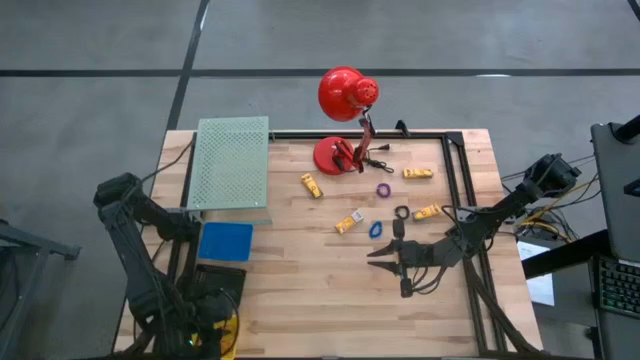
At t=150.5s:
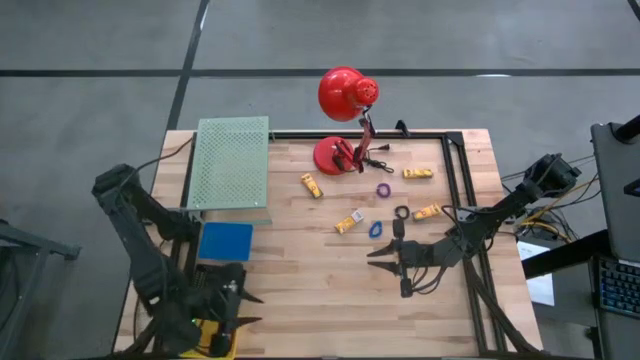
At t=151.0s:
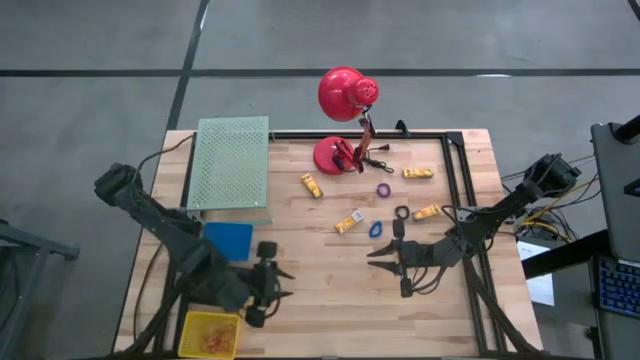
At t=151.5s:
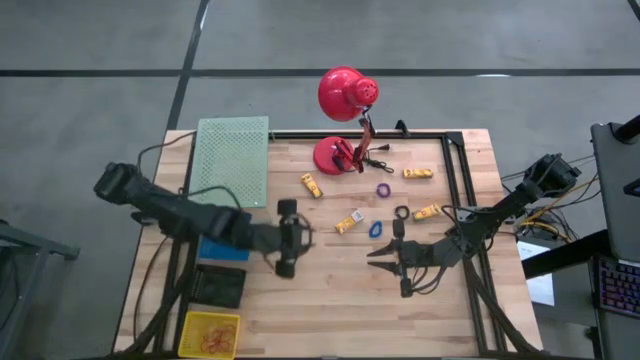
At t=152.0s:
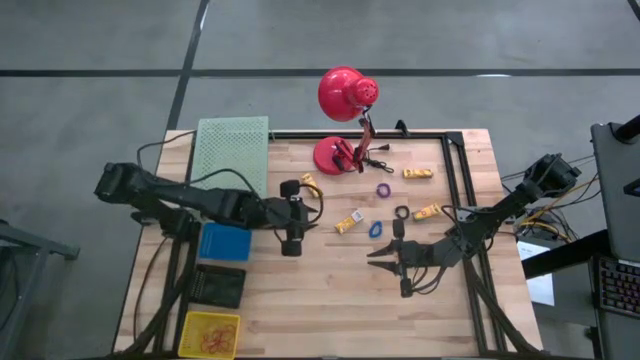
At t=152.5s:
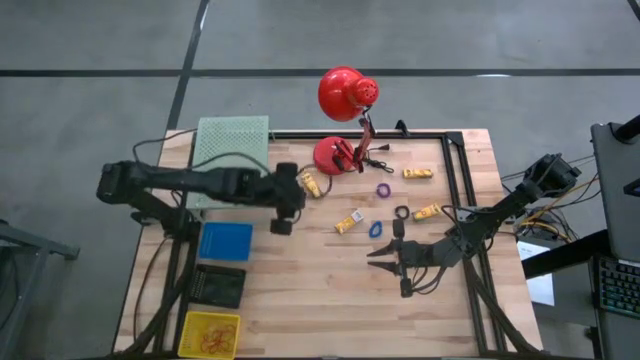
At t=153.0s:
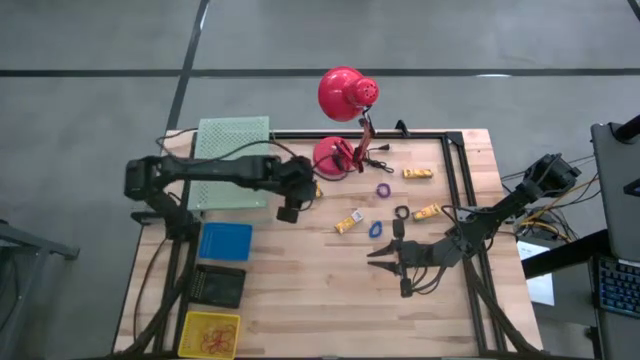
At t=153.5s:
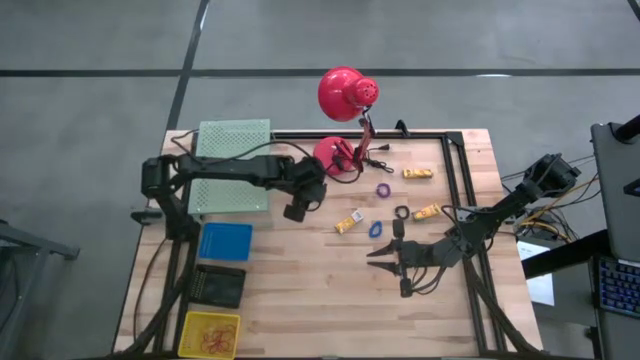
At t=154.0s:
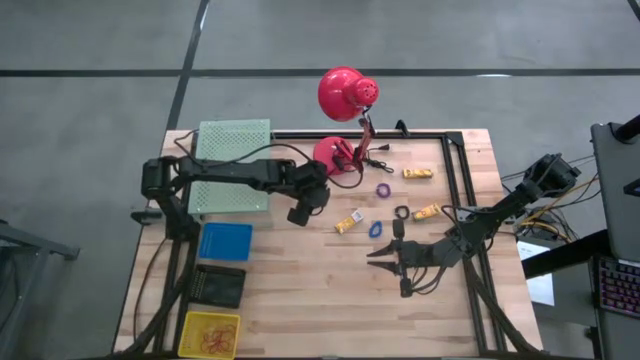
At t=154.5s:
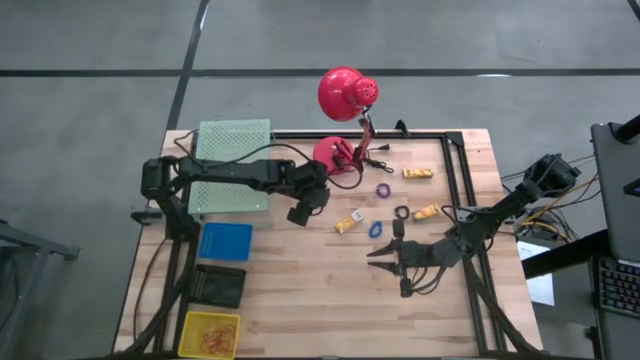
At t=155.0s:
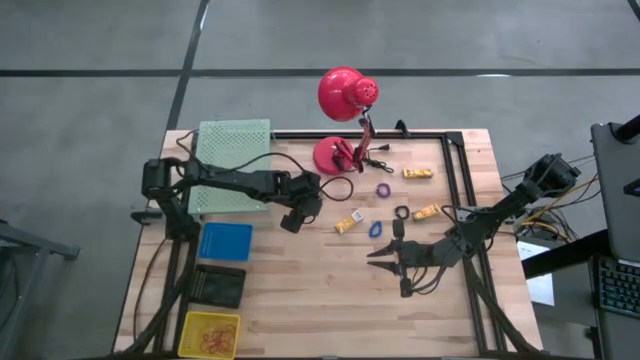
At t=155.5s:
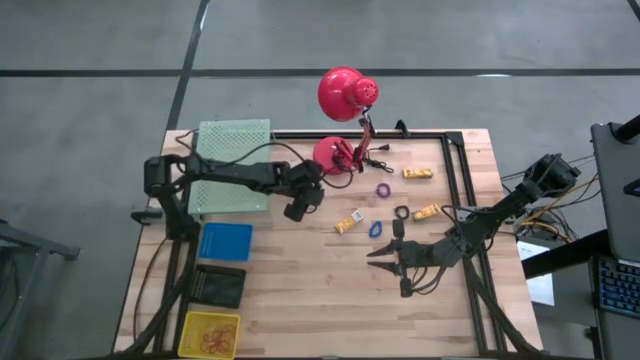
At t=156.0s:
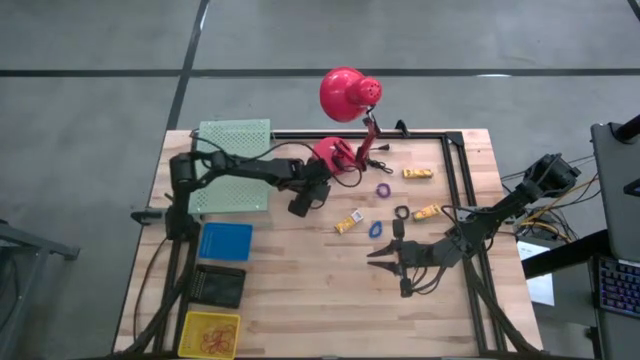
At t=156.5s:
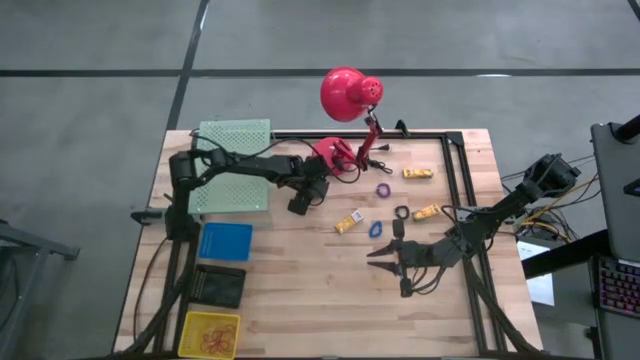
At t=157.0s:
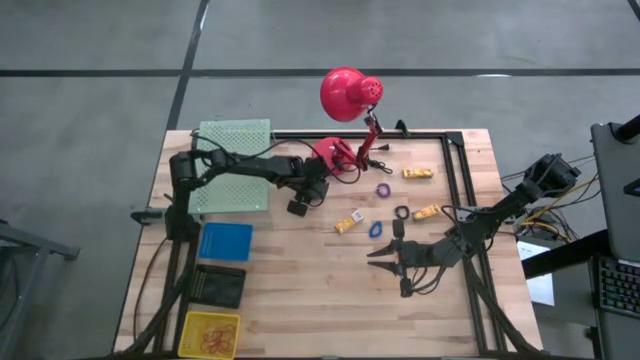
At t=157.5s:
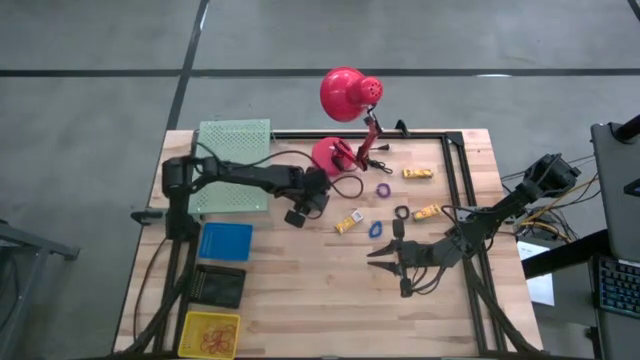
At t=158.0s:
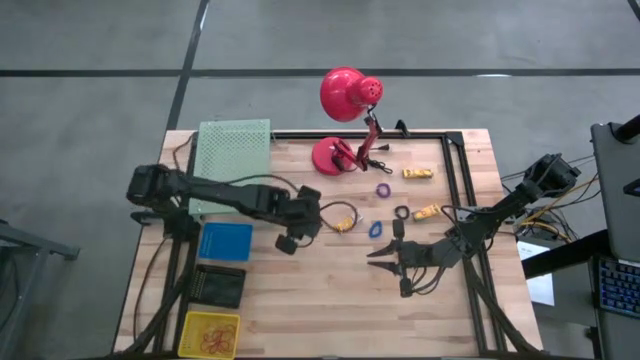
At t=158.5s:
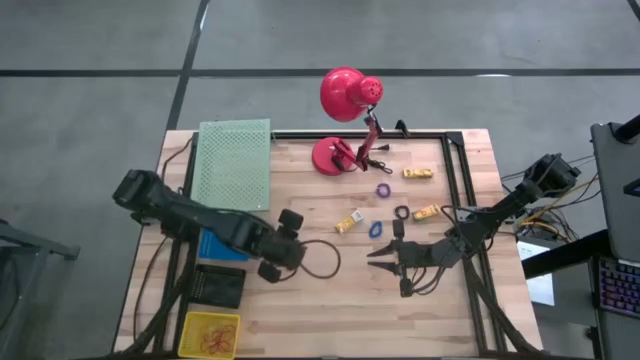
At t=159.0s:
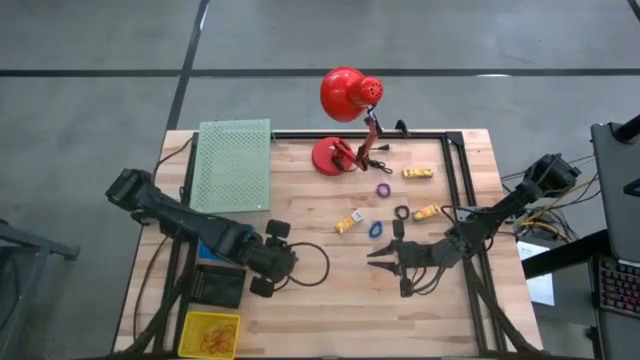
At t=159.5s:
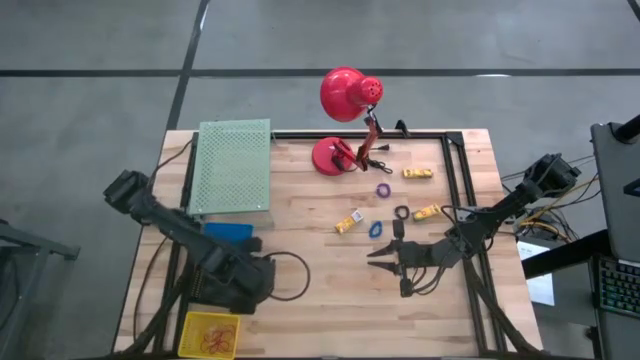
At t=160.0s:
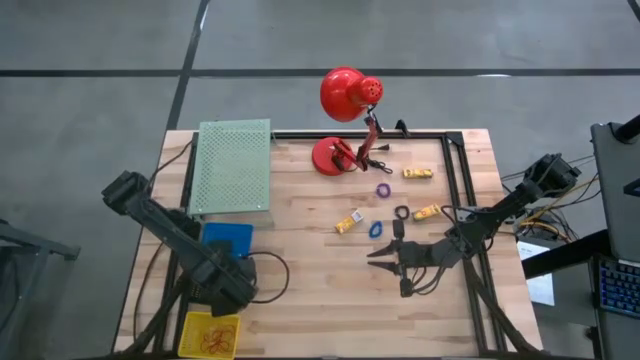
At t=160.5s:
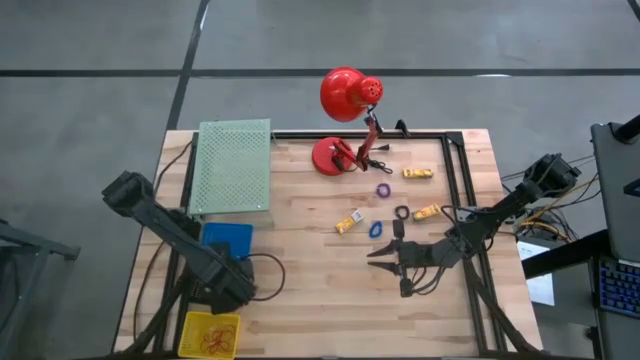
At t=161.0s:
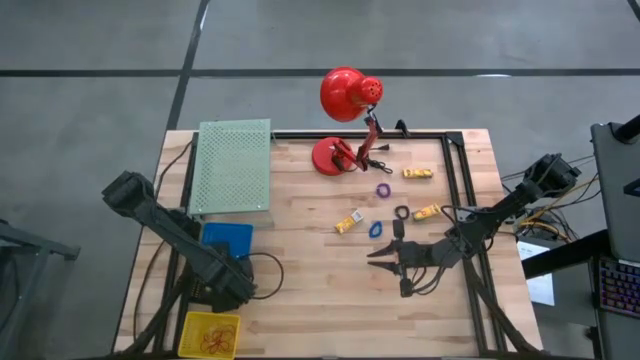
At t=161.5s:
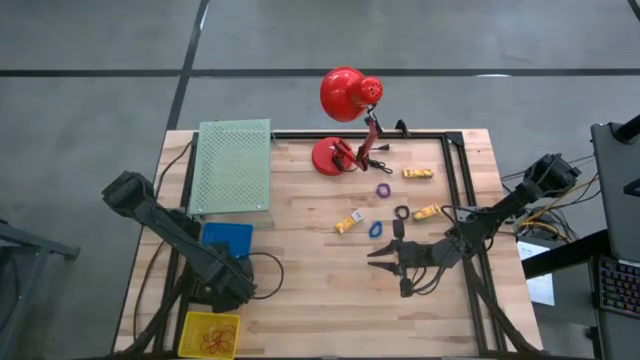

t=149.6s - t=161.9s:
Task: Pick & Place Office Desk Supplies
Put the crayons box into the black bin

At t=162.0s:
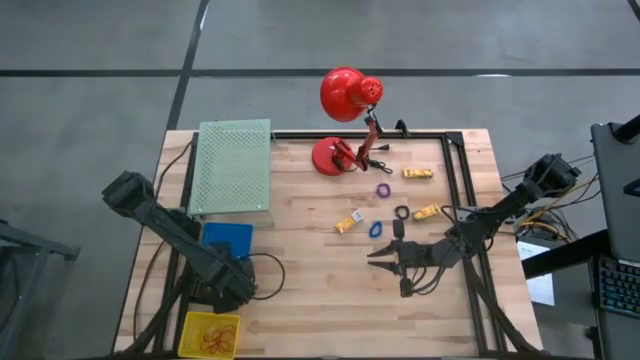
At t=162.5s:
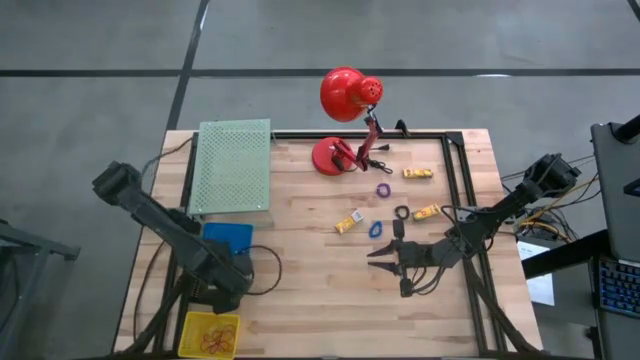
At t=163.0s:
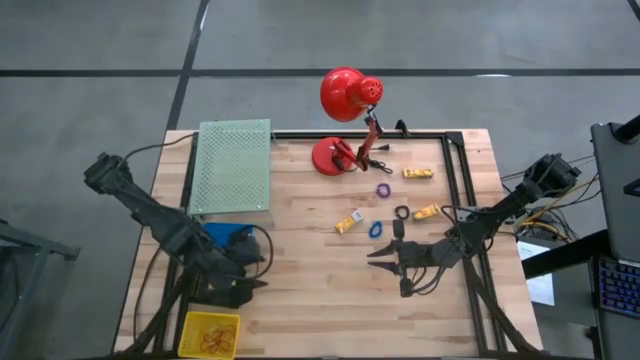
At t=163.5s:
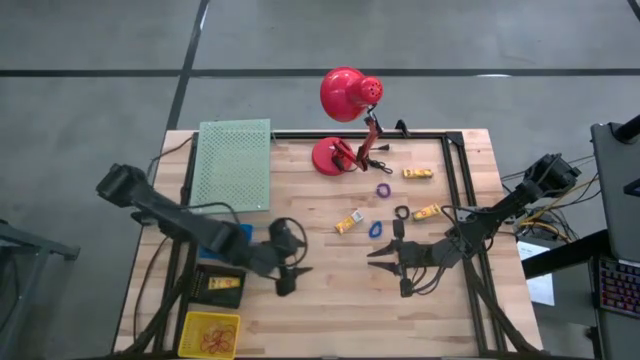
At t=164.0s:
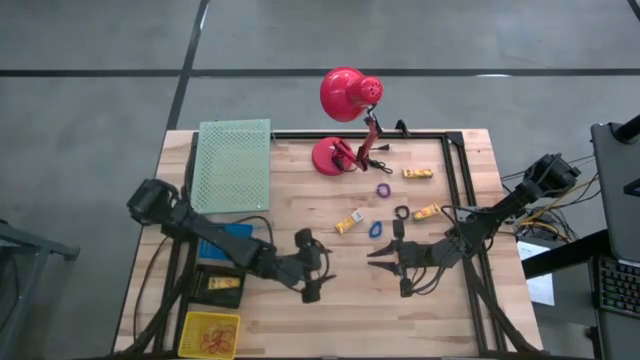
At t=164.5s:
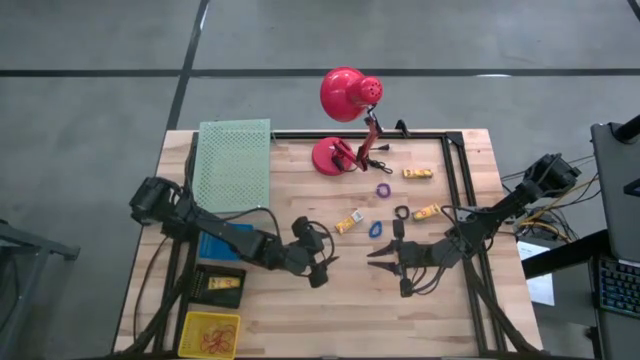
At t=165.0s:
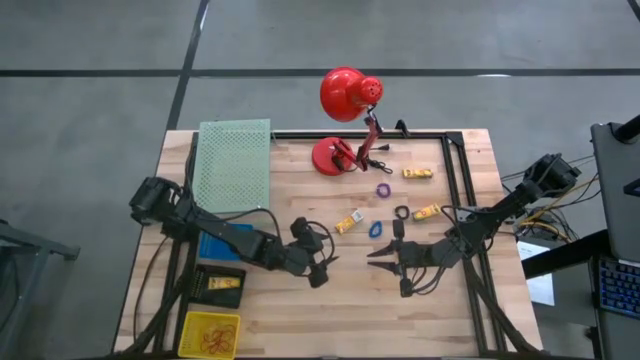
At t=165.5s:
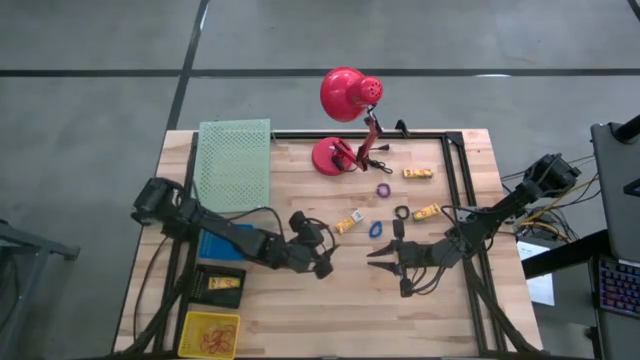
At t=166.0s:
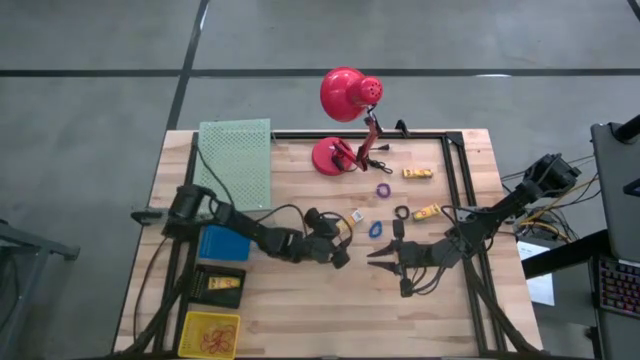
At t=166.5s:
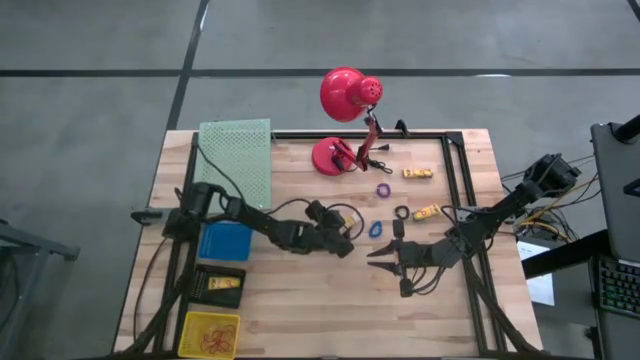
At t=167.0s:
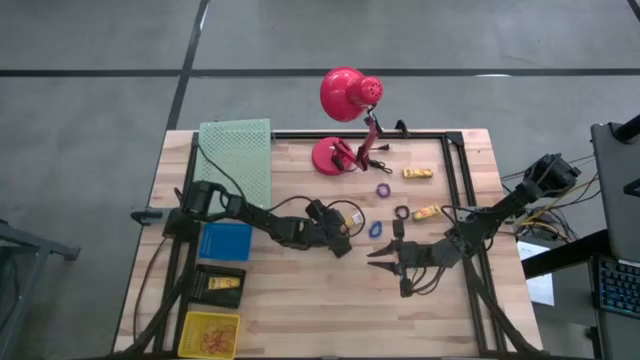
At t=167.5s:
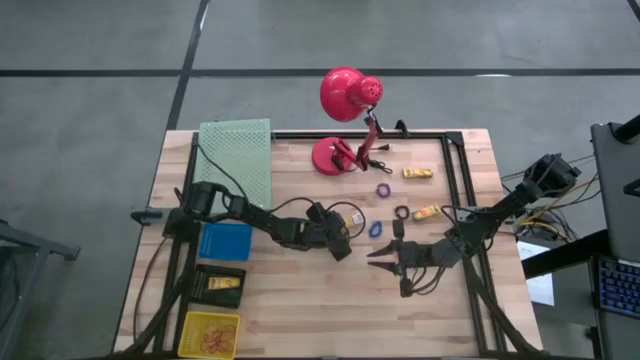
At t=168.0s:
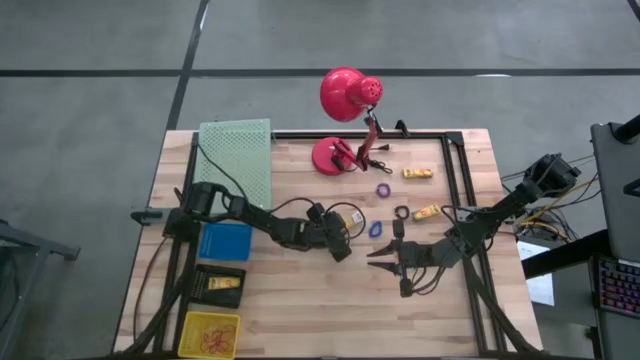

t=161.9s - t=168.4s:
Put the crayons box into the black bin

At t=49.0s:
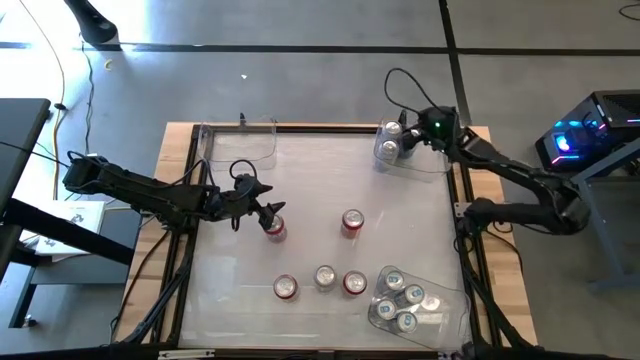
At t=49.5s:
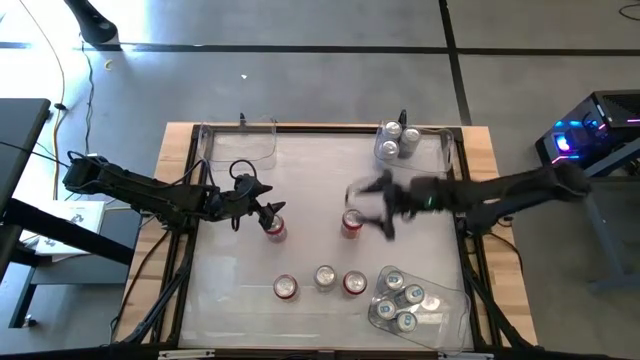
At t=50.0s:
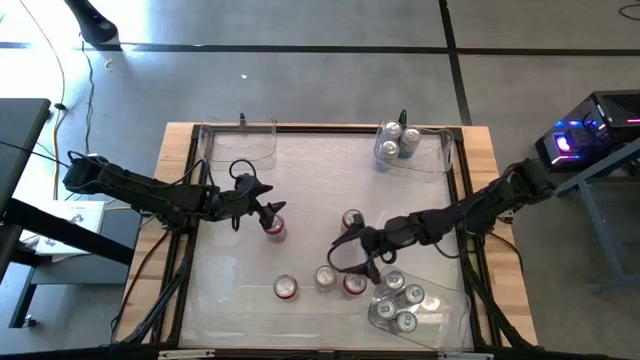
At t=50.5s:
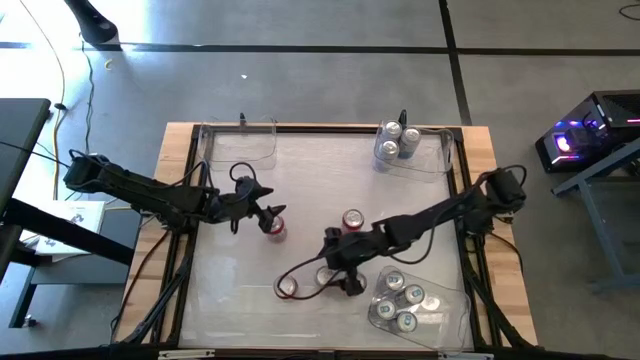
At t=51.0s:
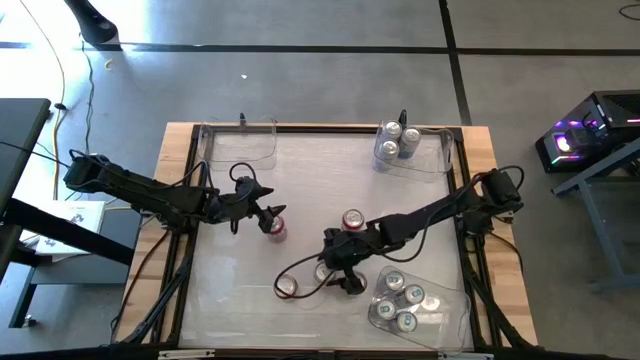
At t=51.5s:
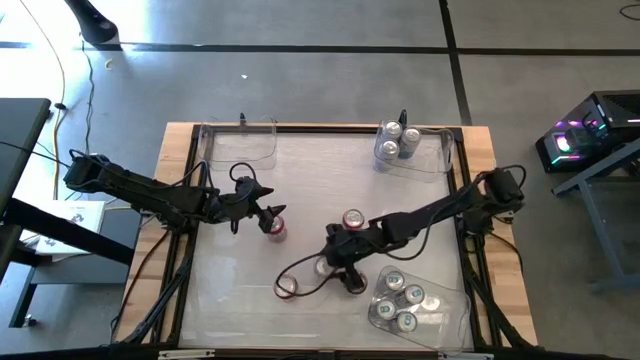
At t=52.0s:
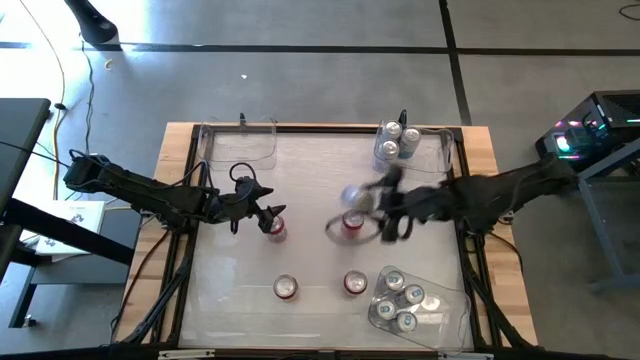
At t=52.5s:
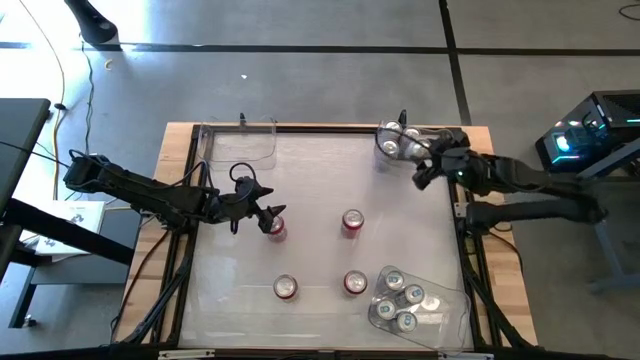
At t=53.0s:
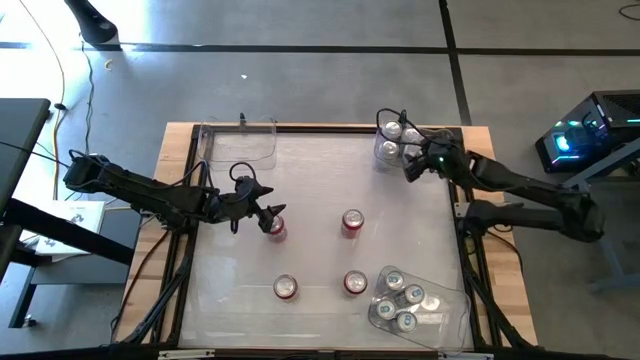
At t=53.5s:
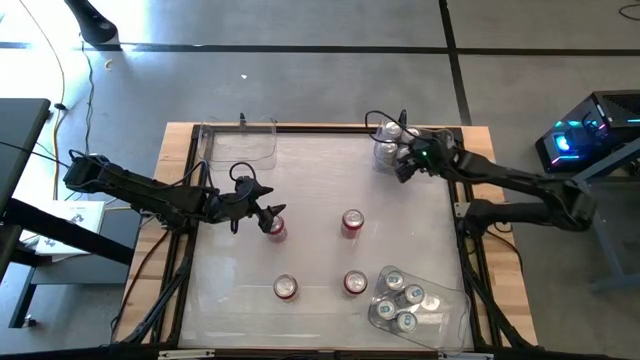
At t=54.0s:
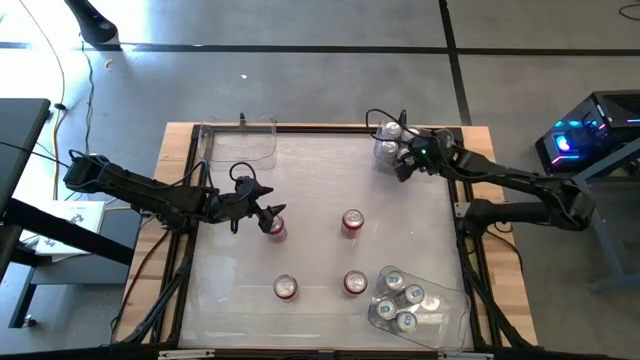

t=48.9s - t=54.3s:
Task: Sort soda cans
Put the blue white soda can into the top right transparent bin
